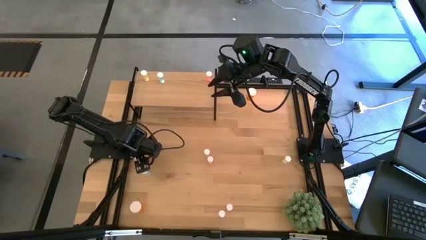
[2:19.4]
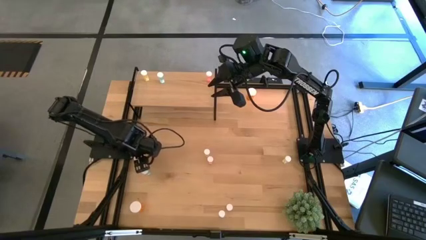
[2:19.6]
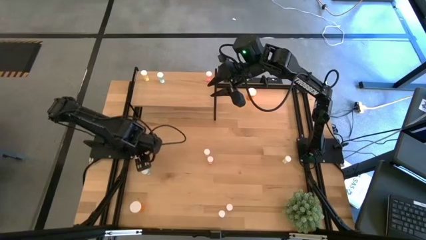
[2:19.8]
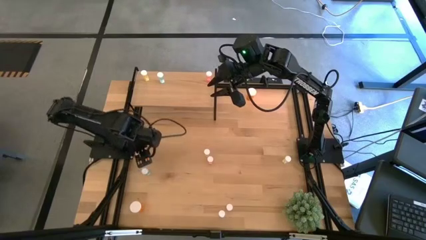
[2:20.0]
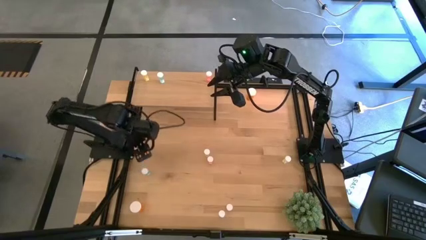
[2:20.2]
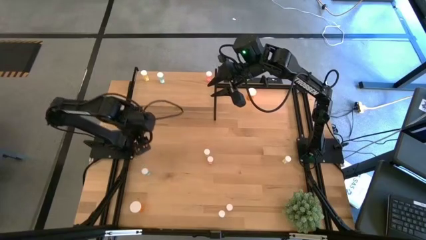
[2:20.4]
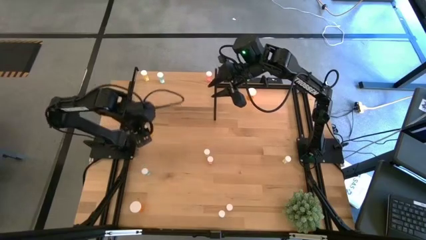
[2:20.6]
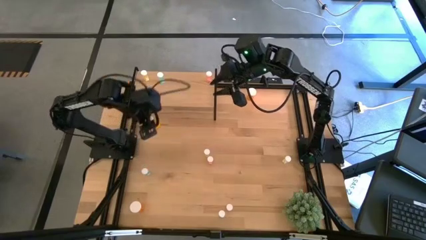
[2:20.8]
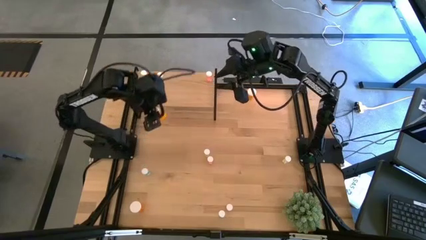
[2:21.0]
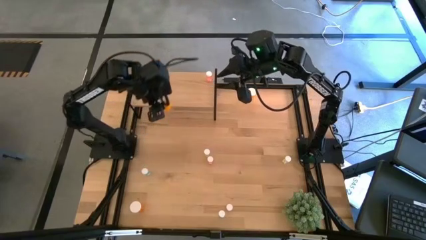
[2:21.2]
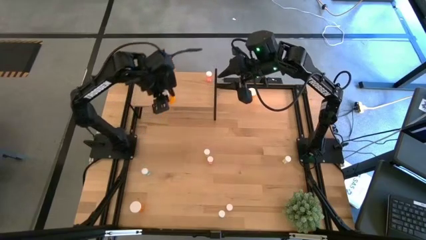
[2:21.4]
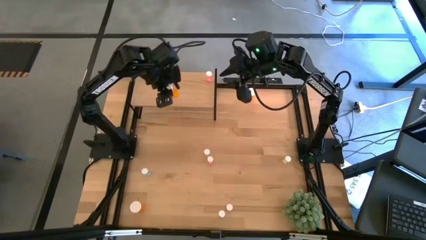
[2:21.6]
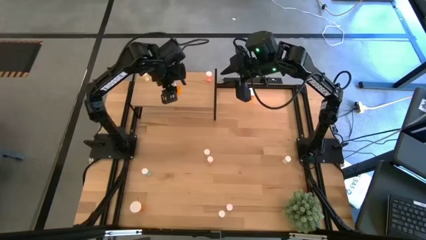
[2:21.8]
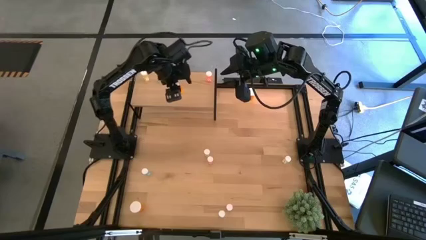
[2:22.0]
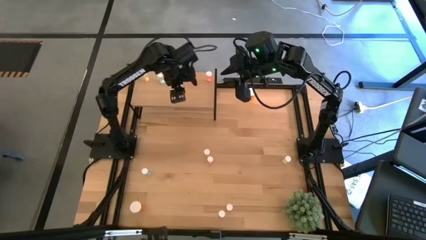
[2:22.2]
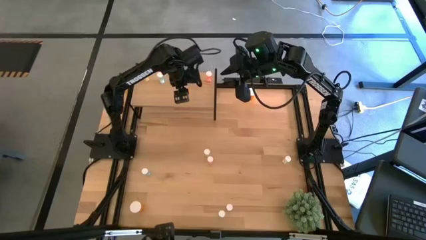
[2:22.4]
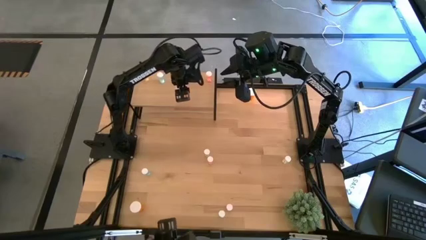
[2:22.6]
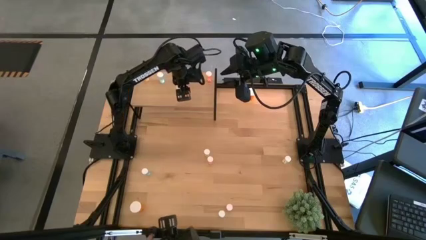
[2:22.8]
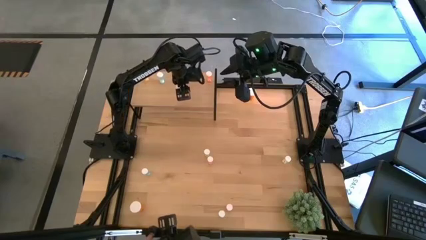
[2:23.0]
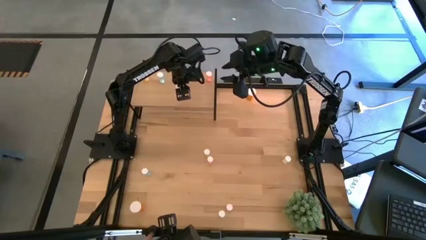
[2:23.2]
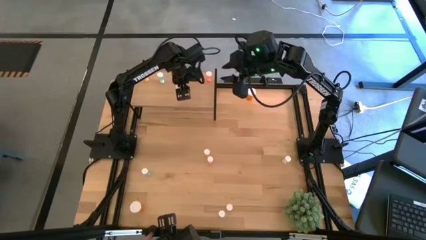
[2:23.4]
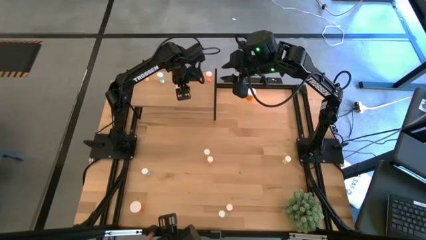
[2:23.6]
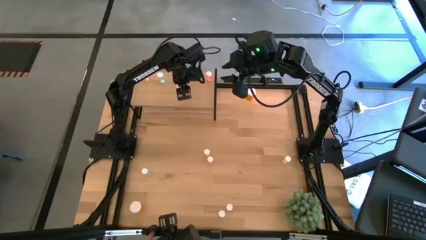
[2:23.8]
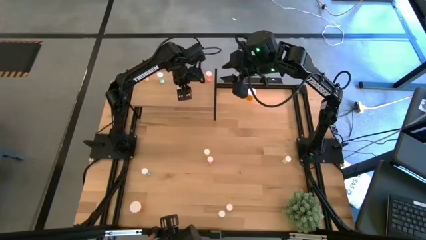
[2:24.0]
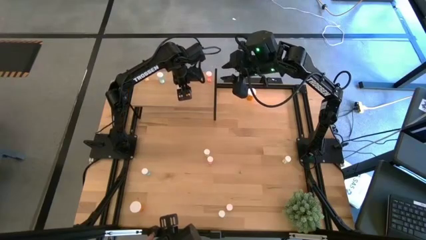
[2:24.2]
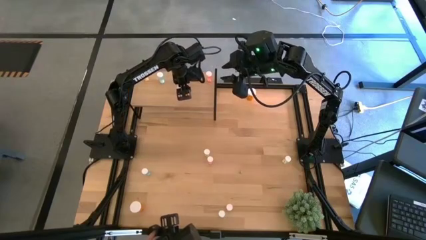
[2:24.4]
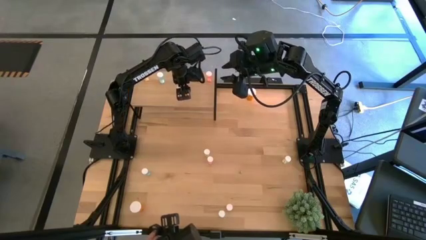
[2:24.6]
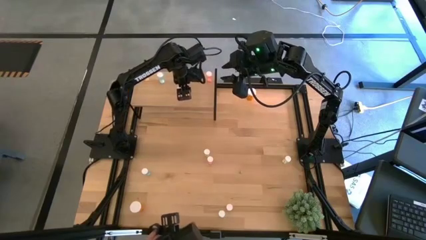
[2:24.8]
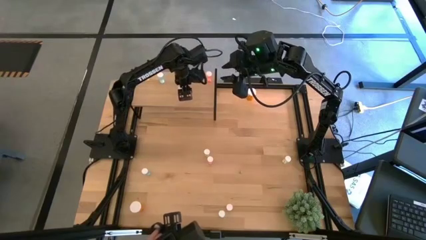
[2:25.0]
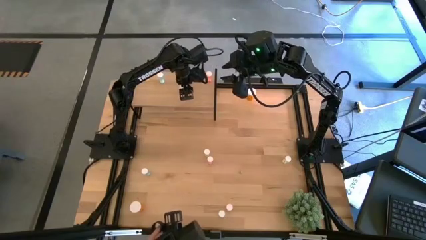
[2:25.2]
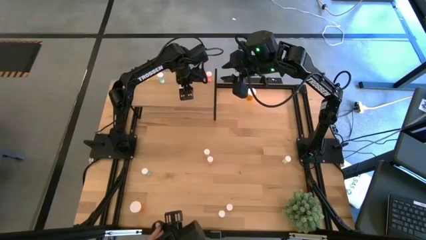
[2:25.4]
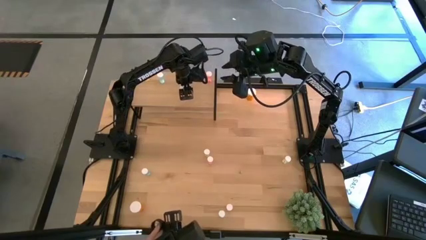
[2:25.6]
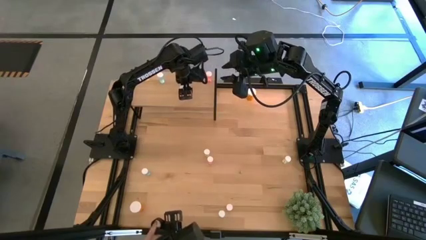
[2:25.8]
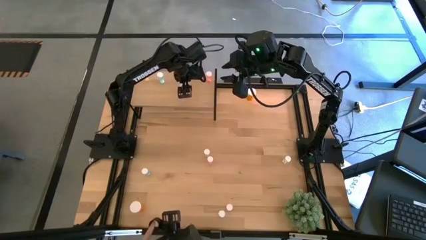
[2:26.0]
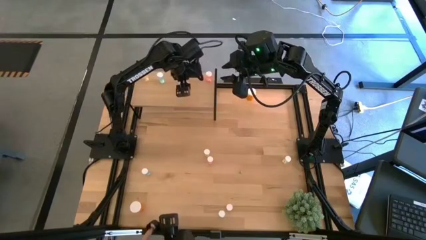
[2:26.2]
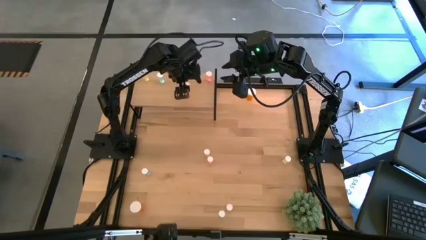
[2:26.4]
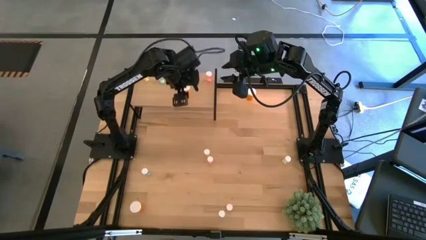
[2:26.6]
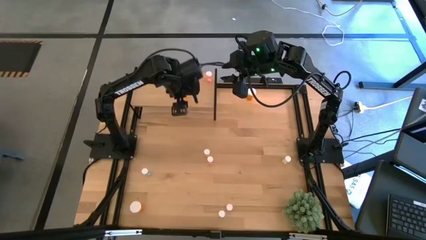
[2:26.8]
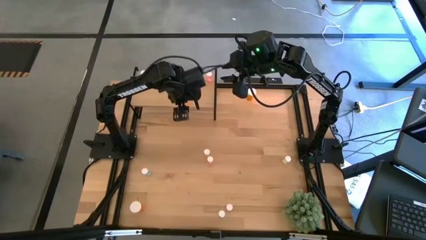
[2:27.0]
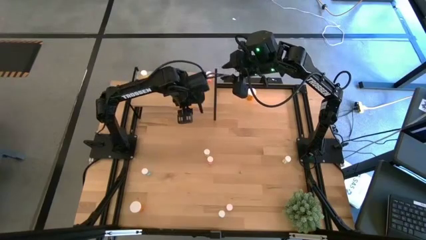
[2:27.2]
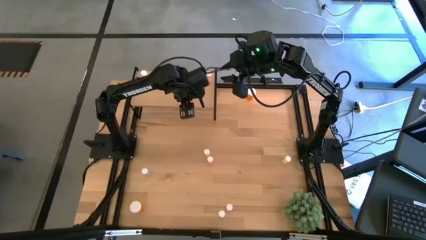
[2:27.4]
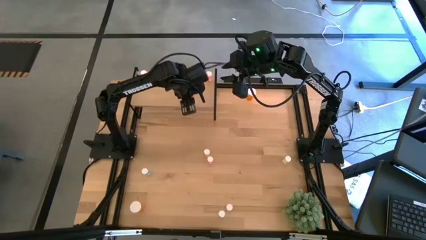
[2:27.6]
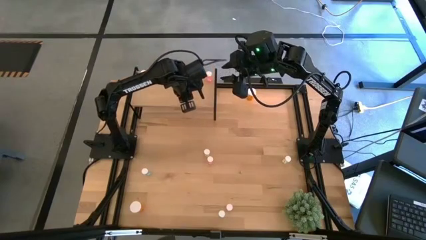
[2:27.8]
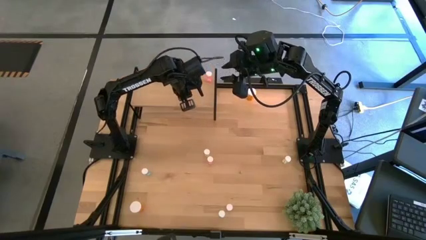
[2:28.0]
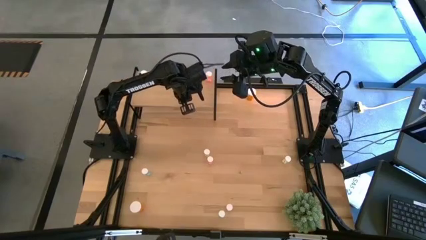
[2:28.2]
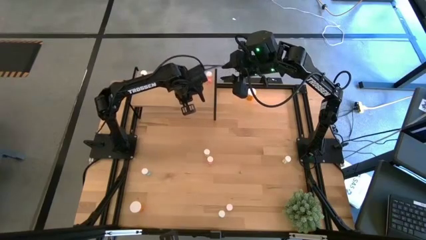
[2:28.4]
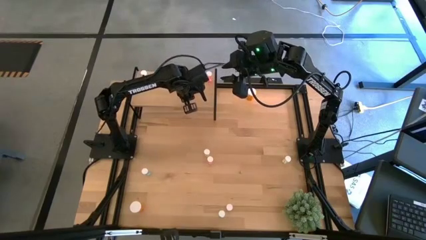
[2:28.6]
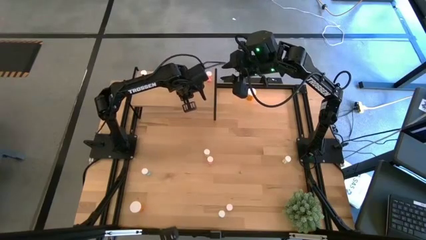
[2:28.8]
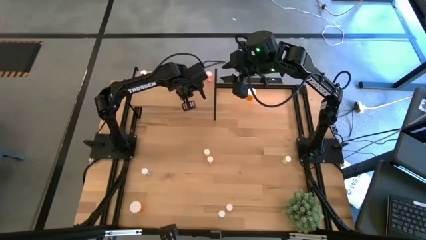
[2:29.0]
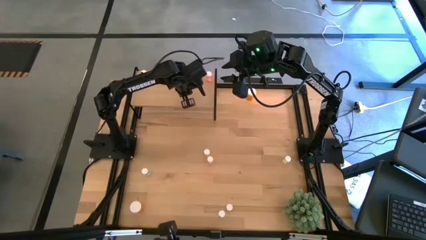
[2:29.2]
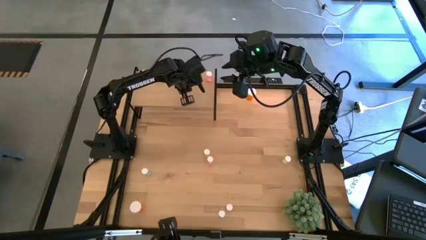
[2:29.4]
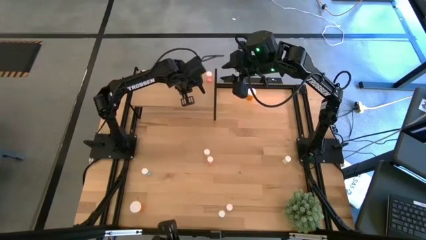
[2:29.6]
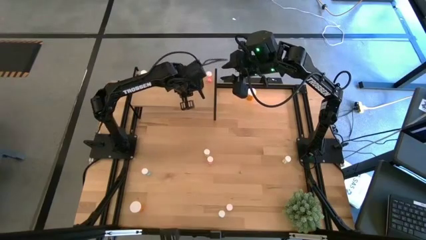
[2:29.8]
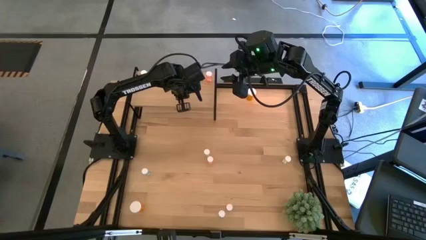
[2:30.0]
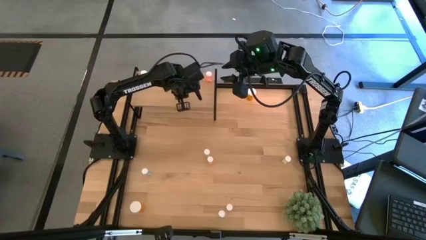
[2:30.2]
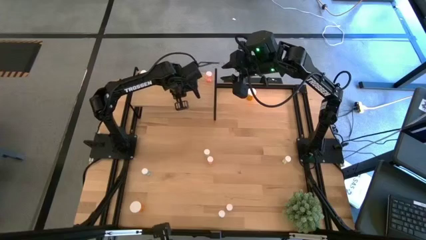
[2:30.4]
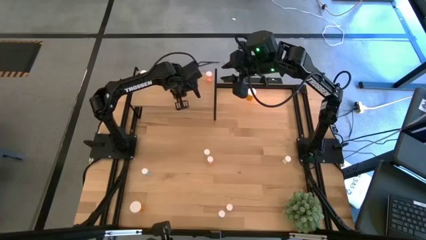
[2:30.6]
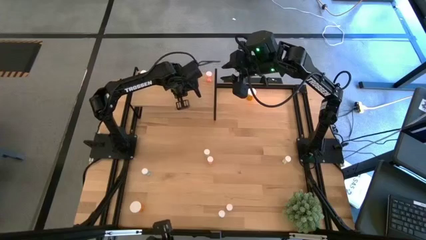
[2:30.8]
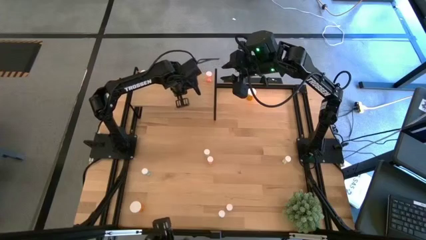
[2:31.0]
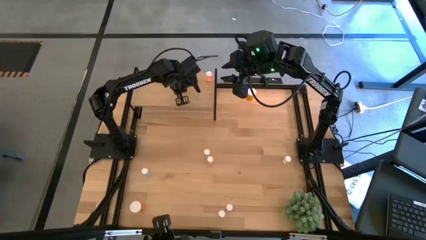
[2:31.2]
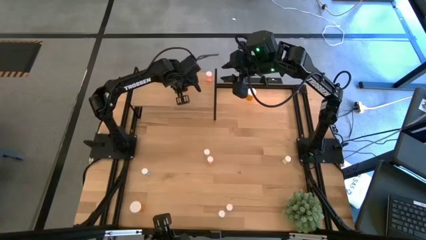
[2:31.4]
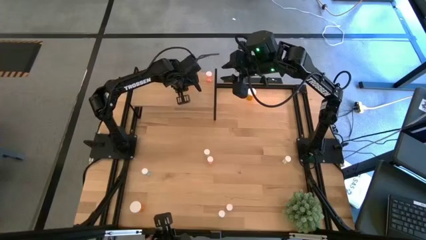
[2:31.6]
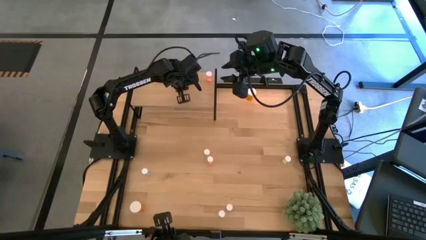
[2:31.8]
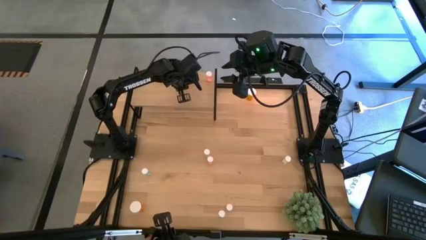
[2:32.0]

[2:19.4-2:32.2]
Task: Pick and place medicine bottles onto shelf by color
Put the middle left big orange pill bottle on the shelf
